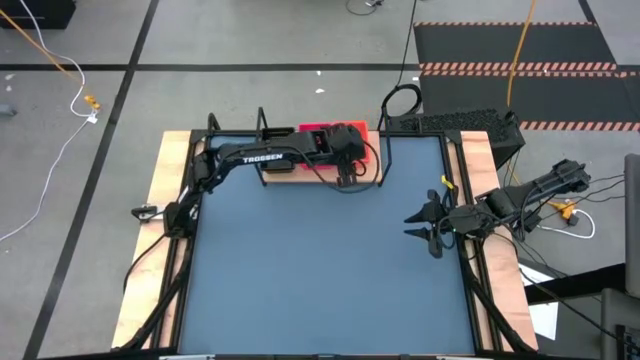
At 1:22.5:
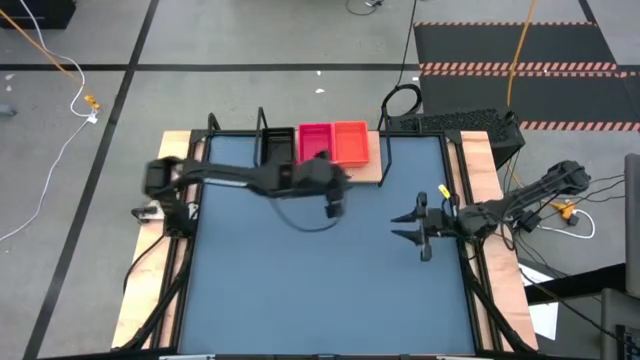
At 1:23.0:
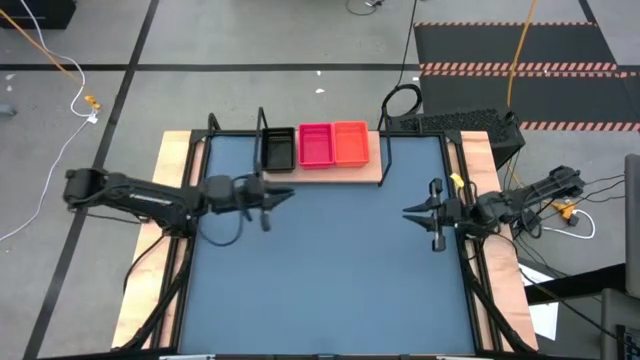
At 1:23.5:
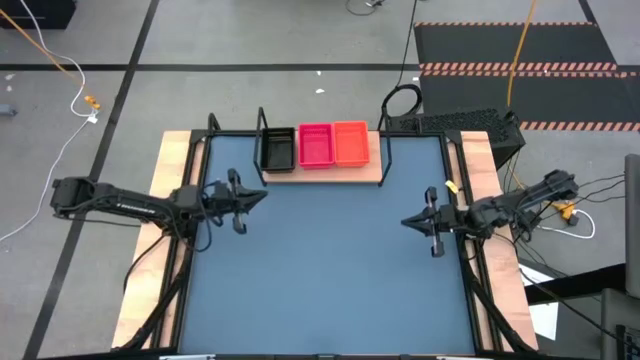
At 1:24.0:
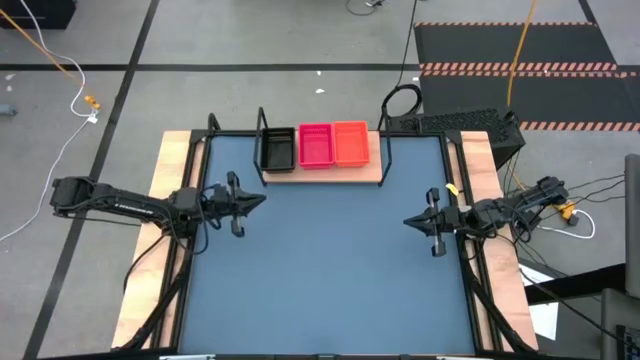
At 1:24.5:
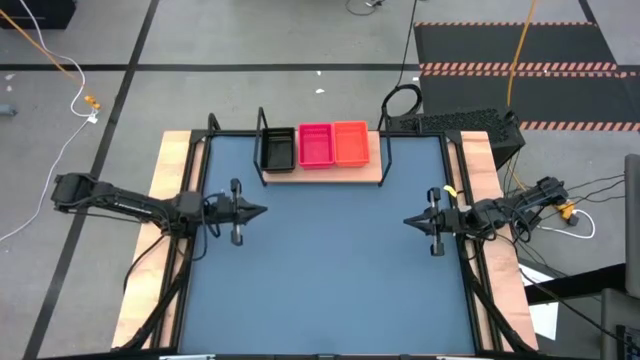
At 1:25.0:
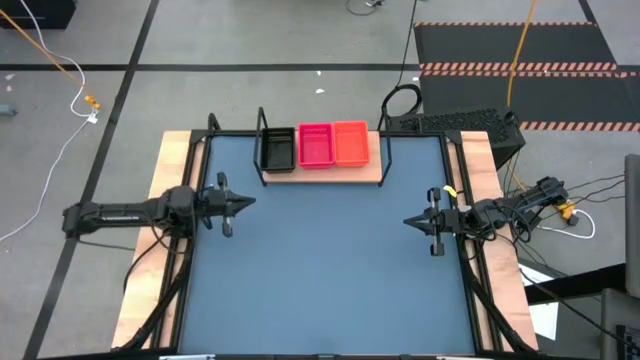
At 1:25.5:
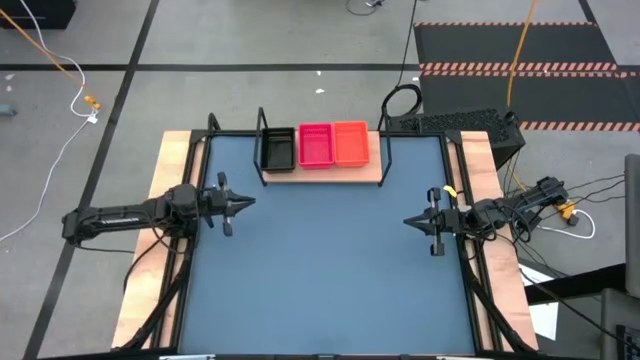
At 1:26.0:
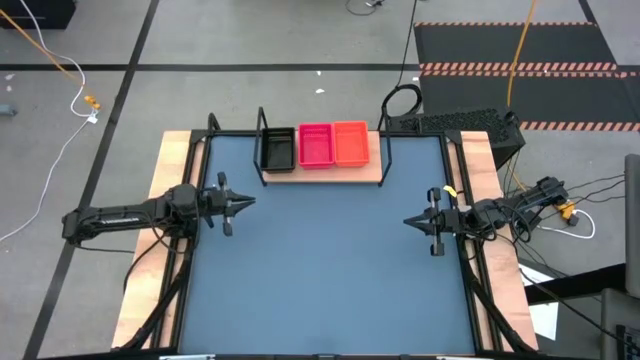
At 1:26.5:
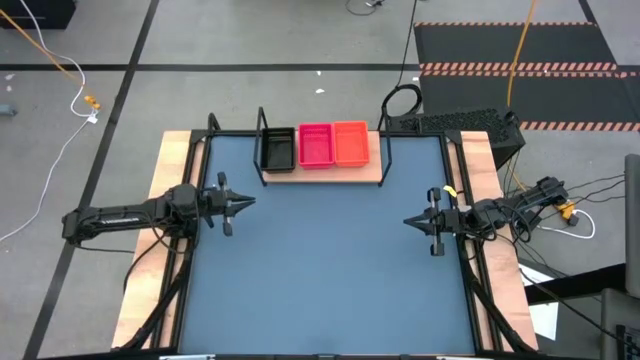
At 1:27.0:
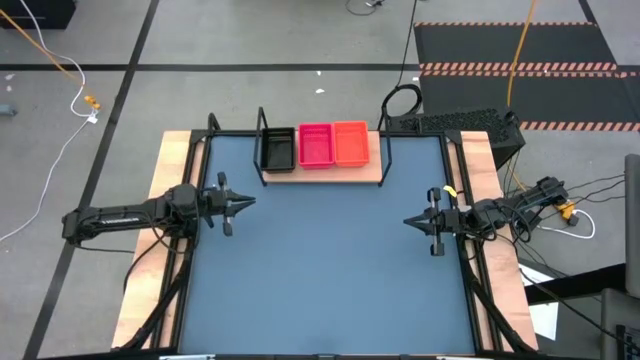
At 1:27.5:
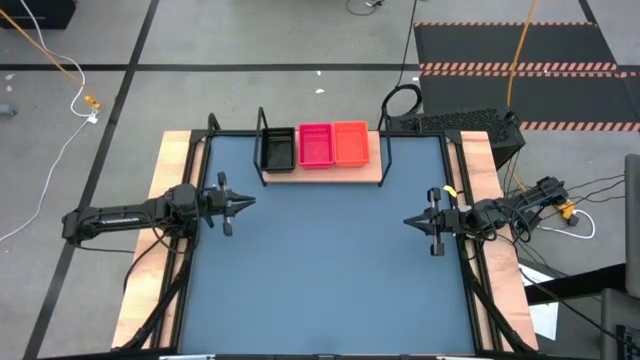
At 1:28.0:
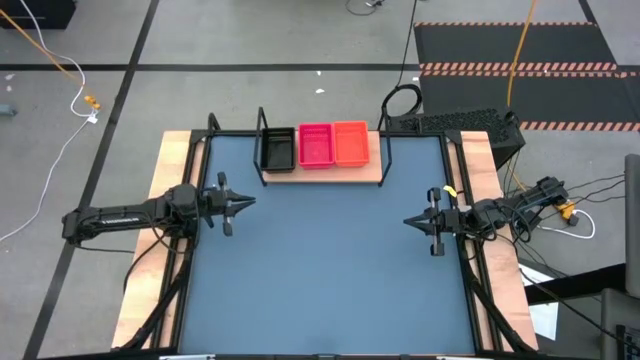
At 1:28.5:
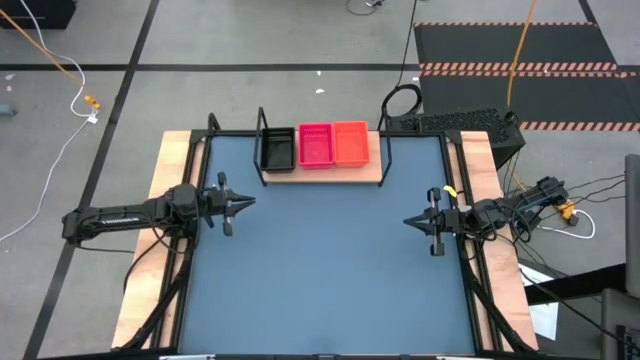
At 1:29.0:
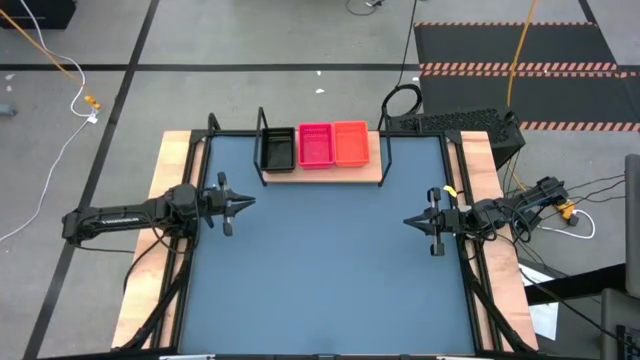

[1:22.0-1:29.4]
Task: Stack baskets on shelf by color
Return to Home Position

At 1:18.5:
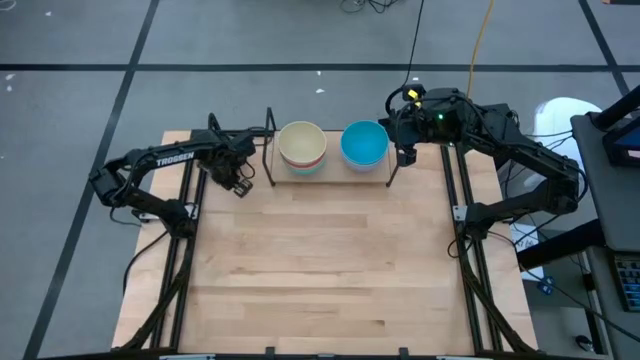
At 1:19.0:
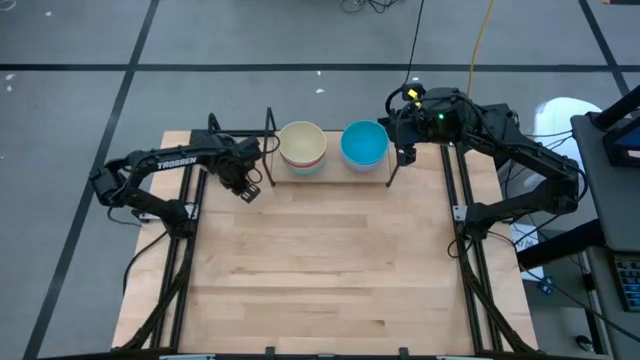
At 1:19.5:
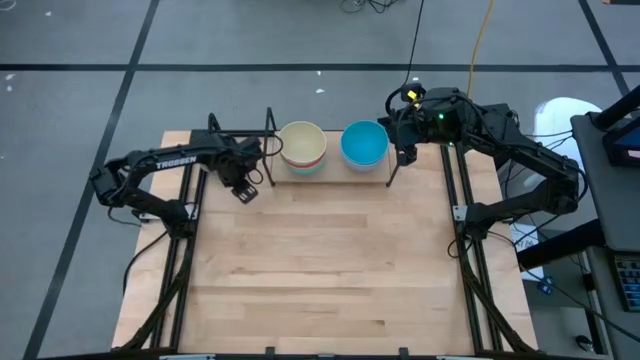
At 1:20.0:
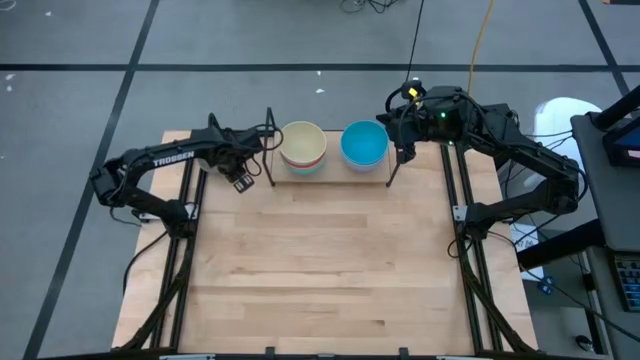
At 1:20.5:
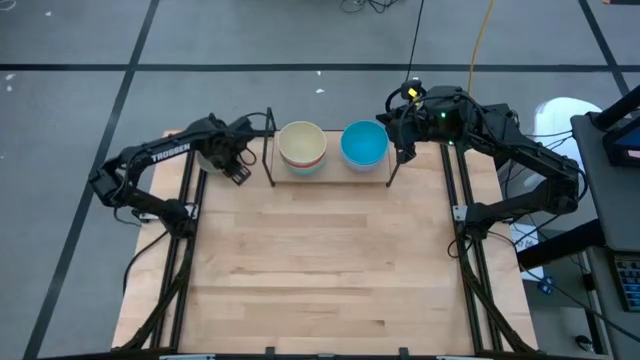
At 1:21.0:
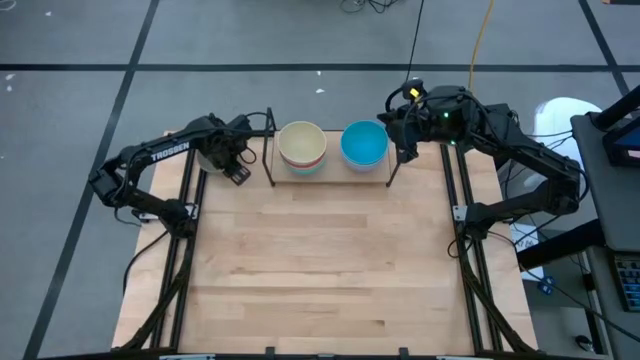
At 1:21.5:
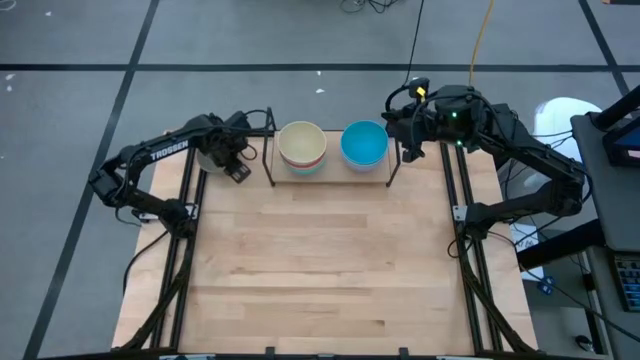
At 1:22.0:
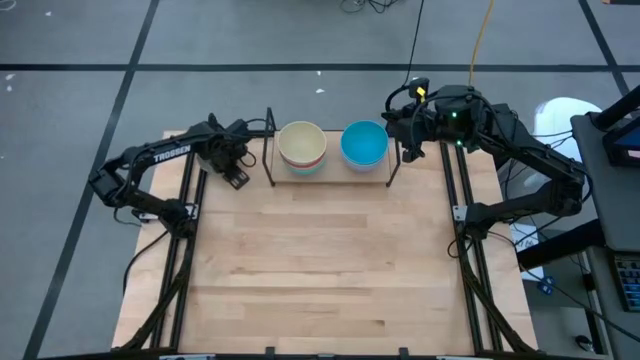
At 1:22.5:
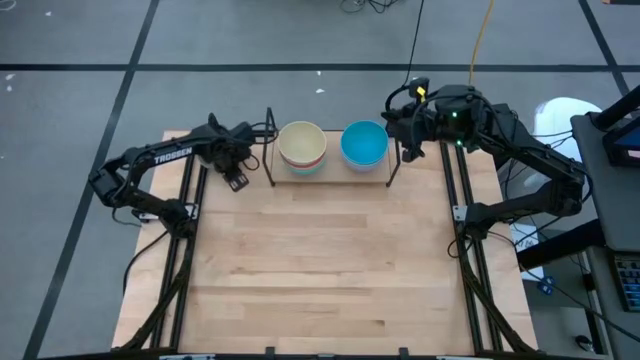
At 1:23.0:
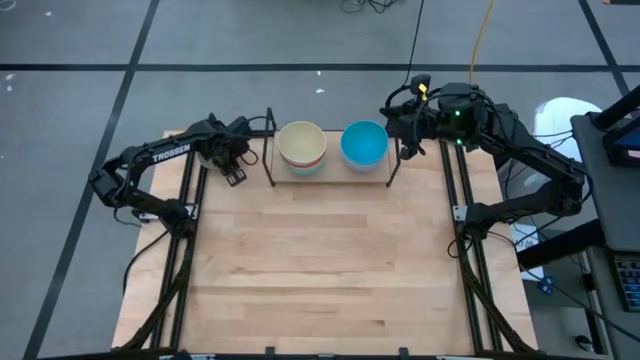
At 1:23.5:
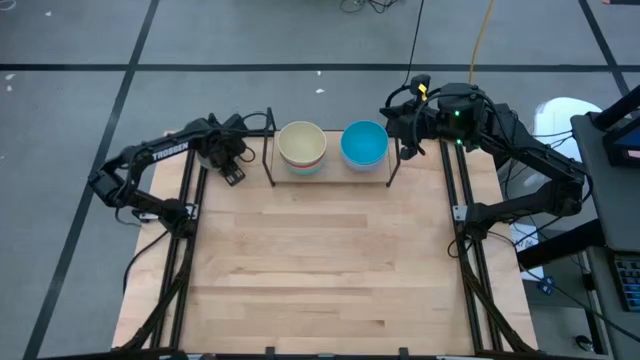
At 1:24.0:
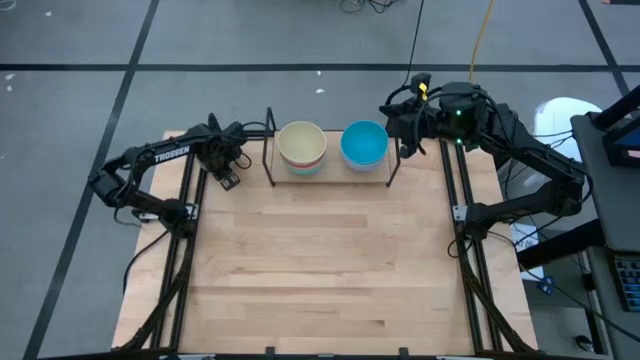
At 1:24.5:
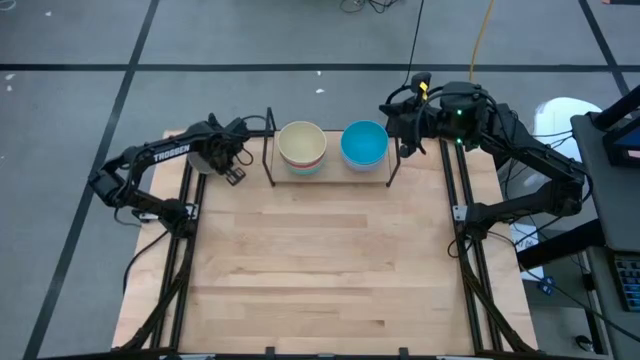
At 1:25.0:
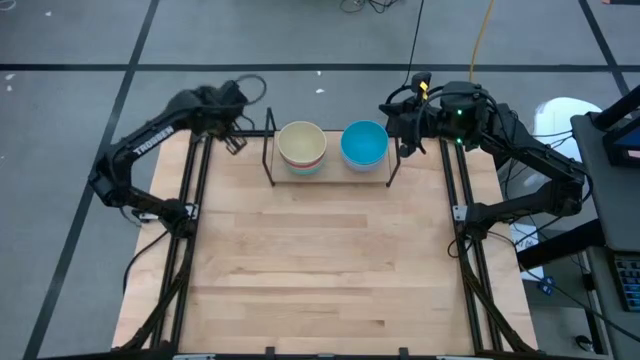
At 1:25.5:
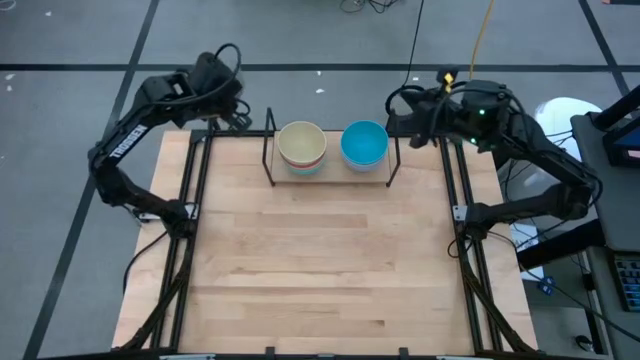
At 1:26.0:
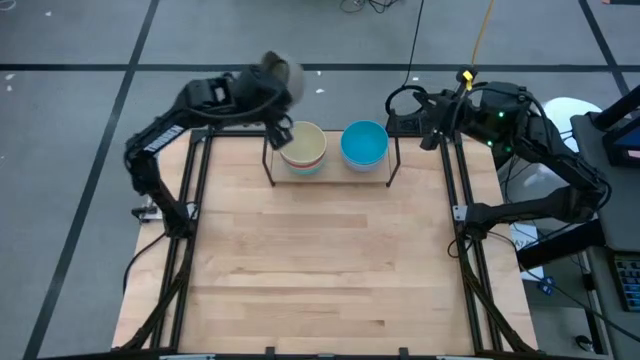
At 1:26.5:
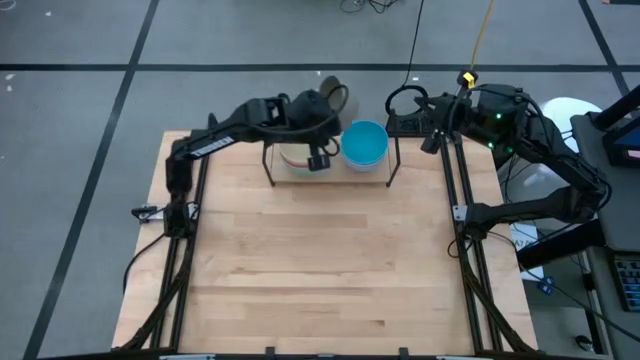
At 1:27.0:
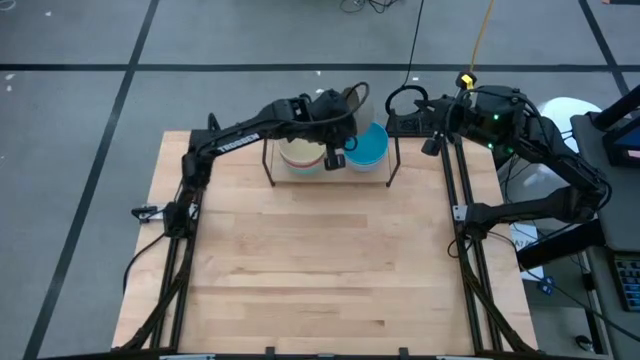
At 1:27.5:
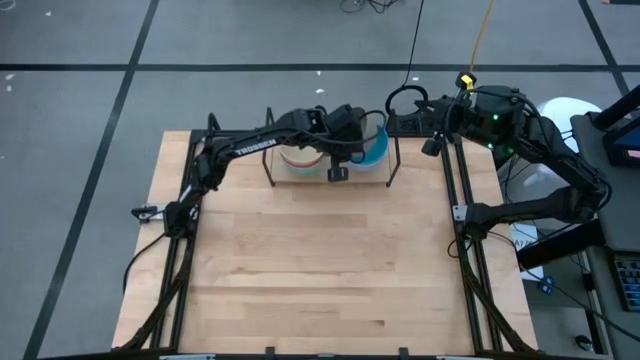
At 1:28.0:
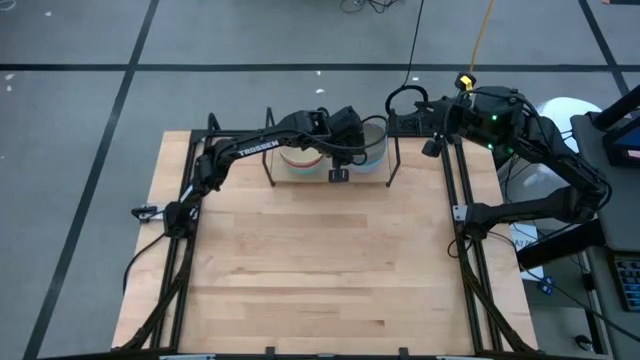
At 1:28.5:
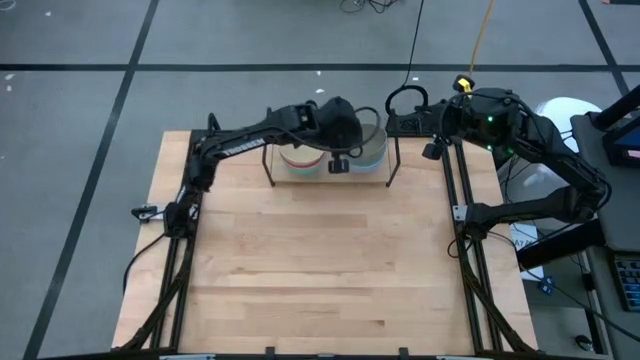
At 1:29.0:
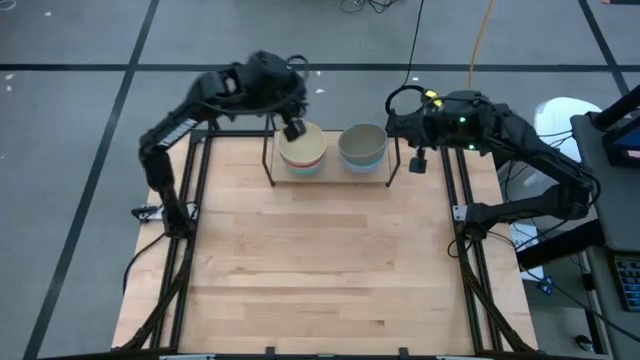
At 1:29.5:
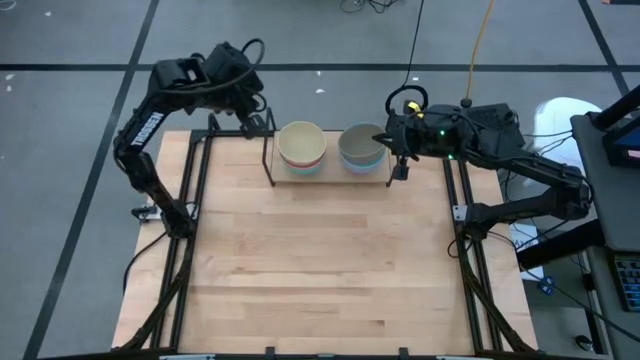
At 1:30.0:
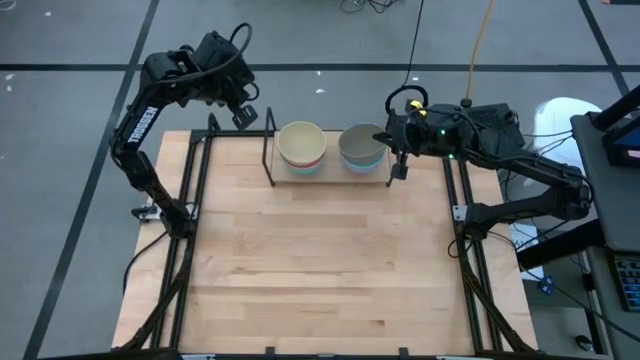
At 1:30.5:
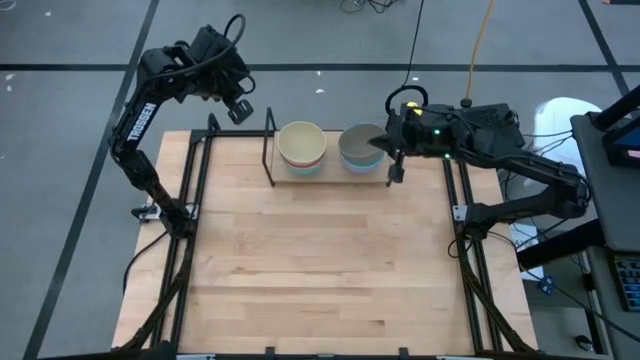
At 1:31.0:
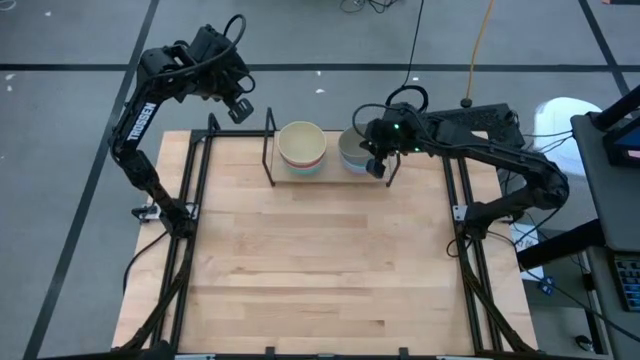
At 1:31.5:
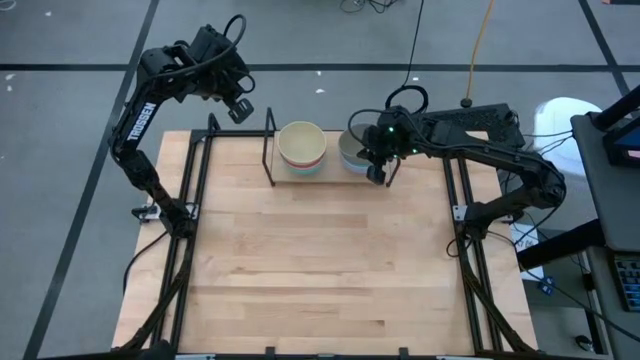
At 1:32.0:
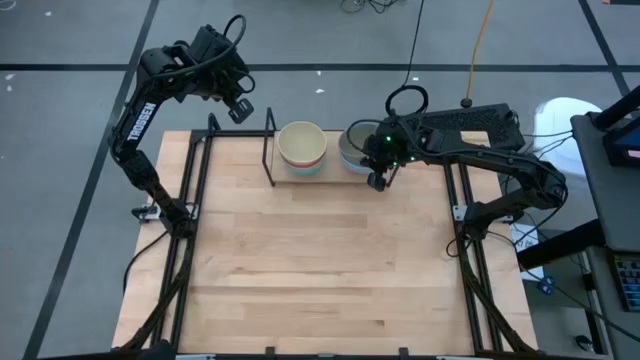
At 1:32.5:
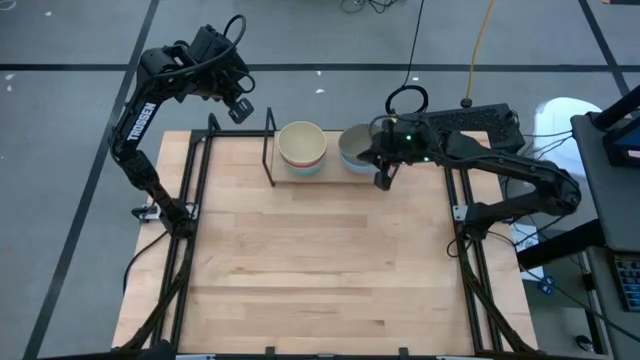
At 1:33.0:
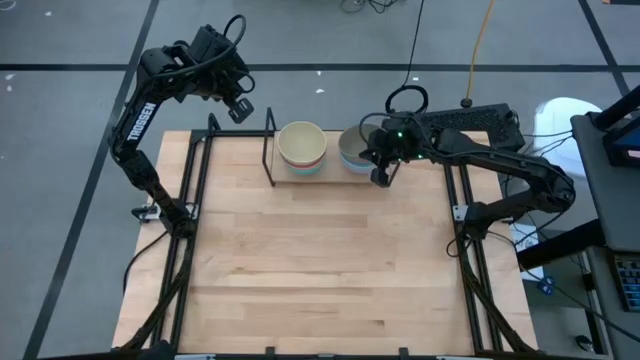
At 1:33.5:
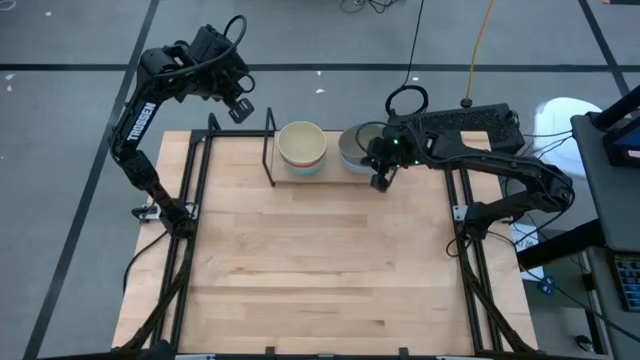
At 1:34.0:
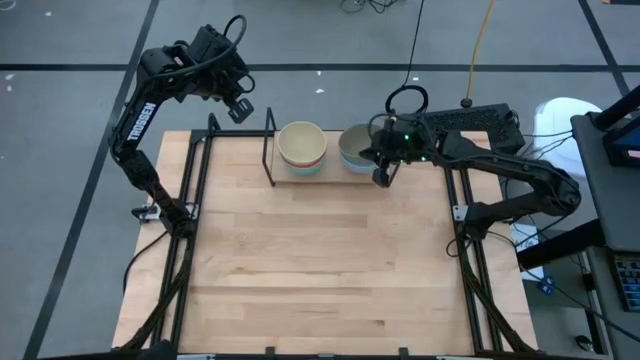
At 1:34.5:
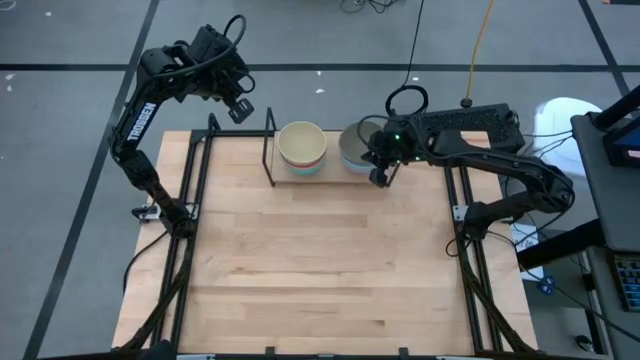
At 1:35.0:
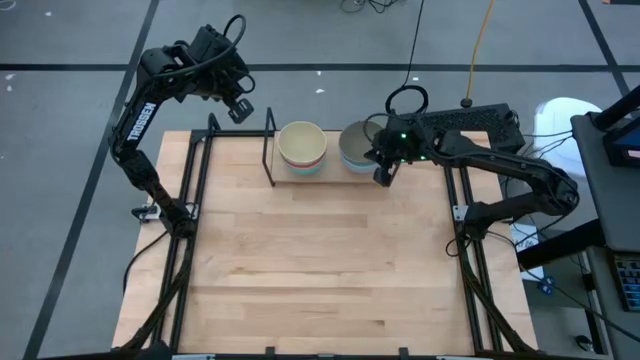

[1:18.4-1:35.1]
Task: Place and stack bowls onto a shelf
Stack the gray bowl on top of the blue bowl on the shelf
